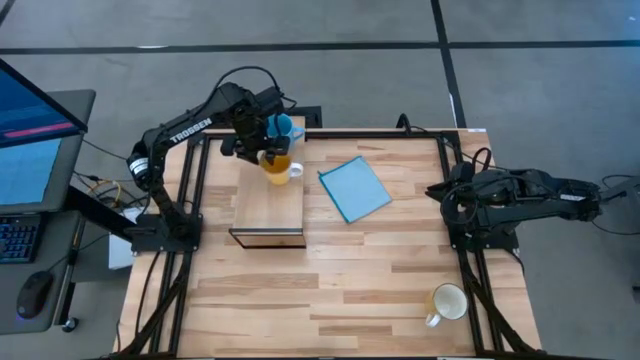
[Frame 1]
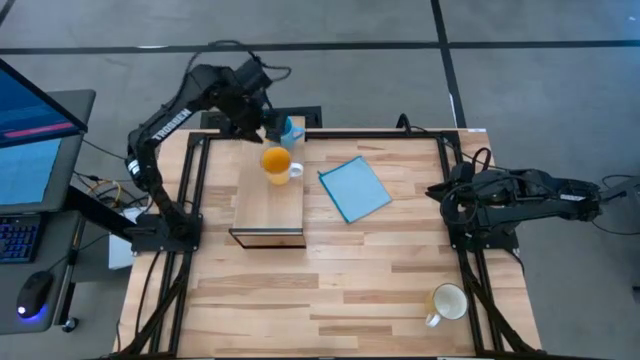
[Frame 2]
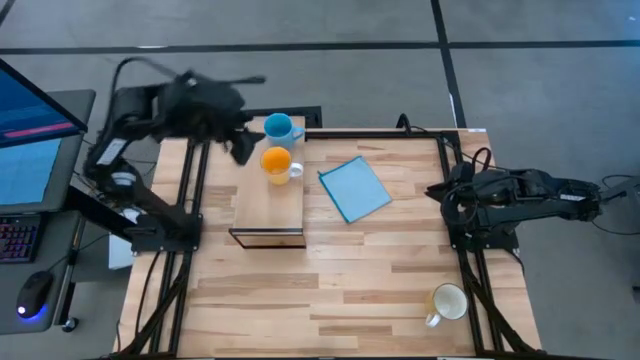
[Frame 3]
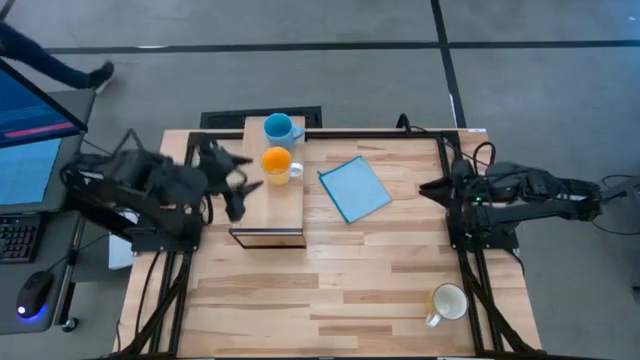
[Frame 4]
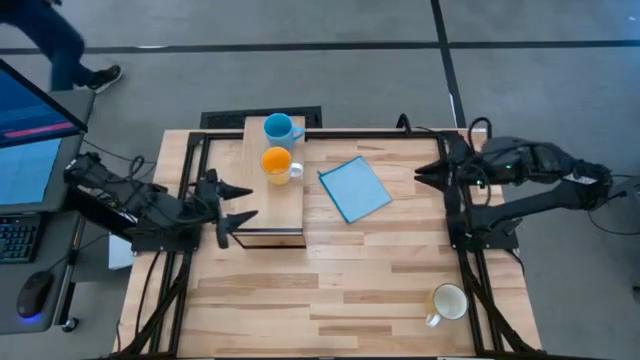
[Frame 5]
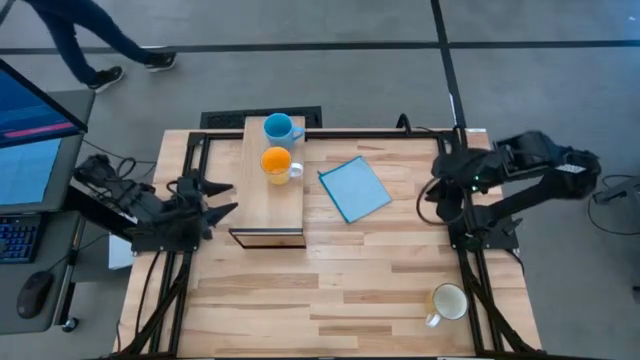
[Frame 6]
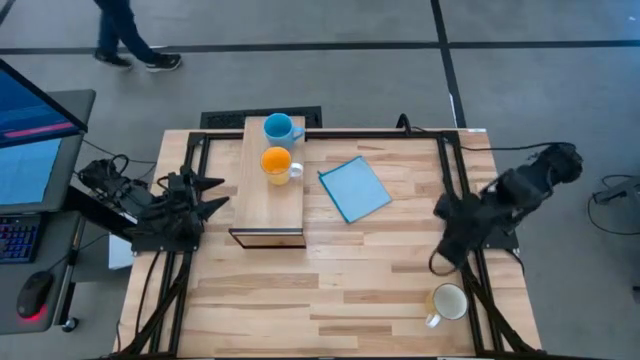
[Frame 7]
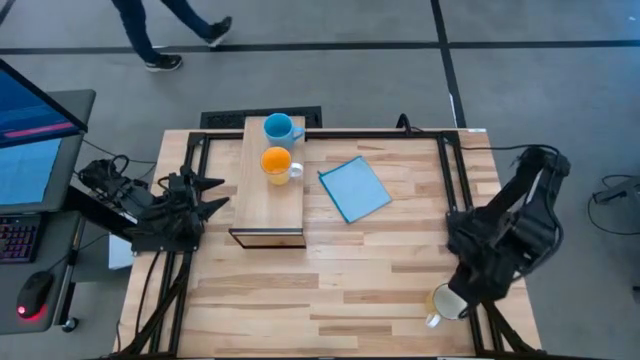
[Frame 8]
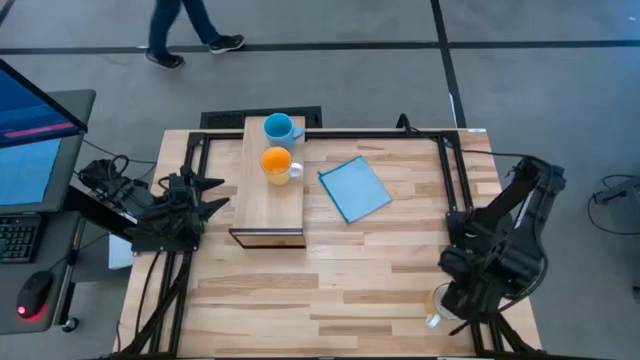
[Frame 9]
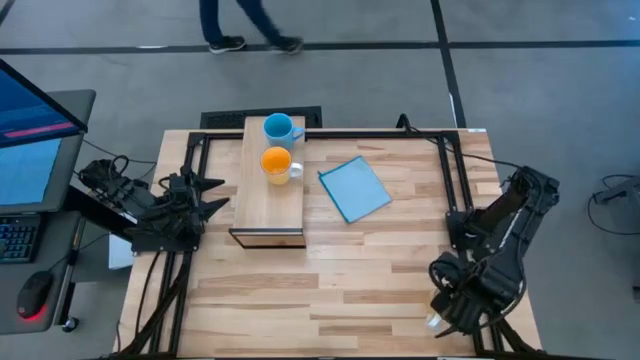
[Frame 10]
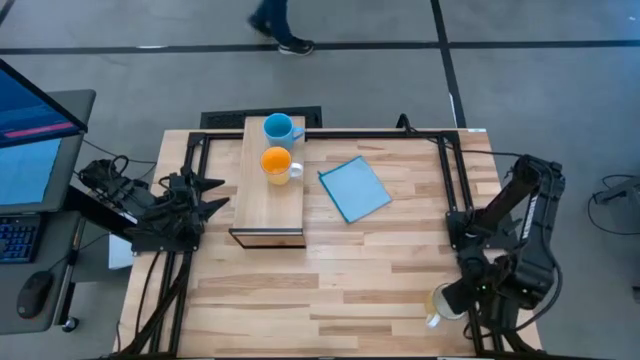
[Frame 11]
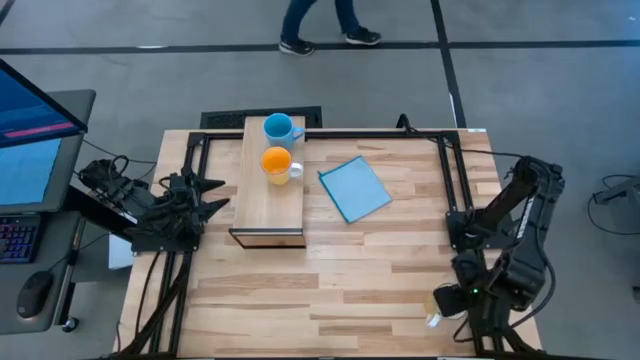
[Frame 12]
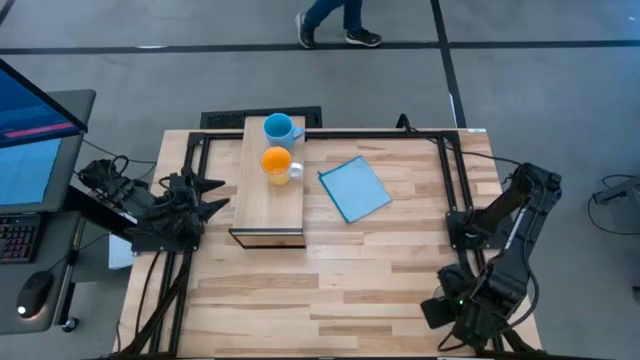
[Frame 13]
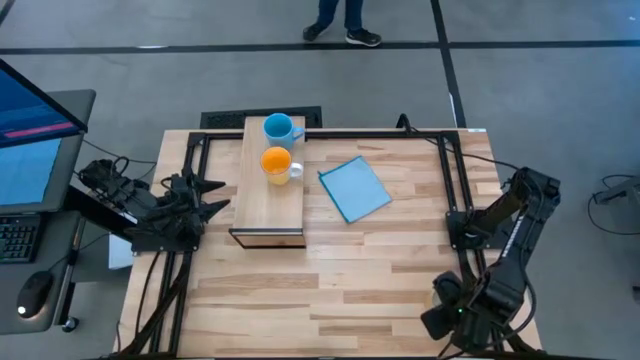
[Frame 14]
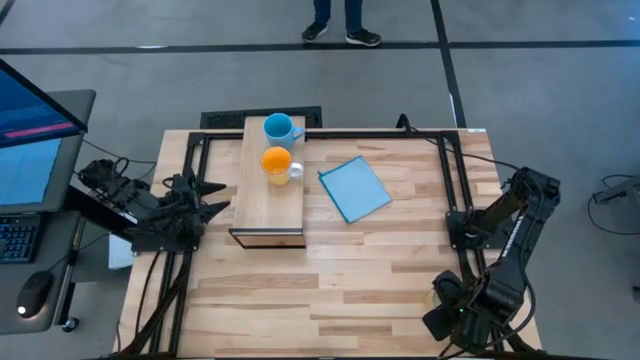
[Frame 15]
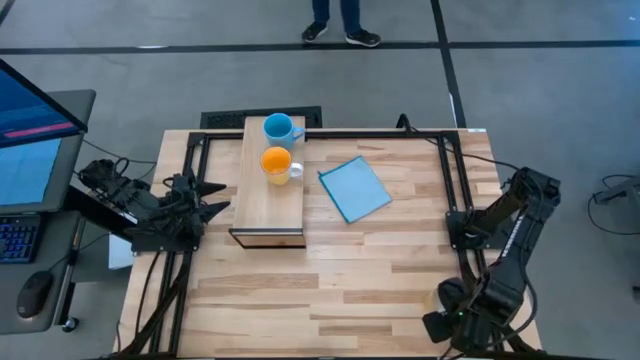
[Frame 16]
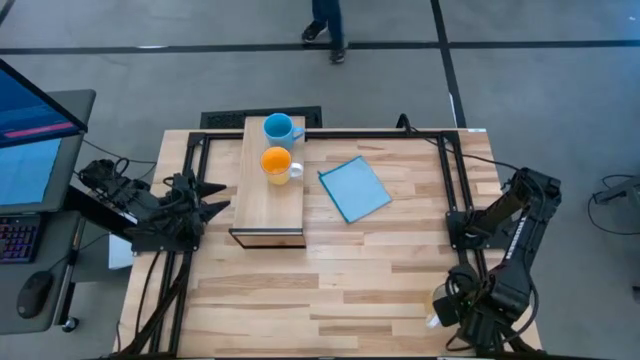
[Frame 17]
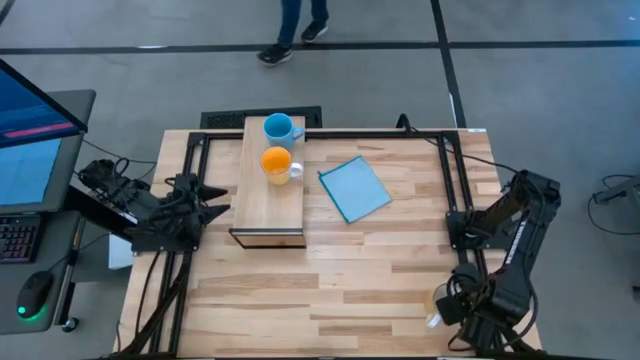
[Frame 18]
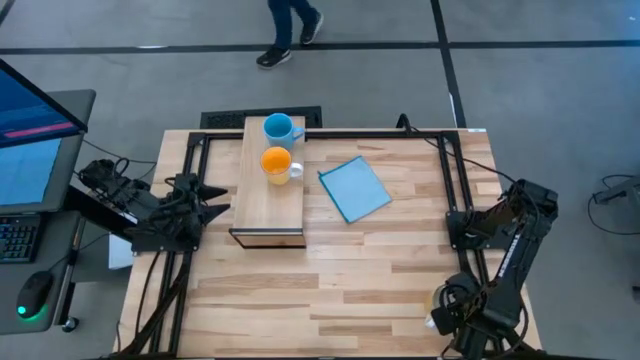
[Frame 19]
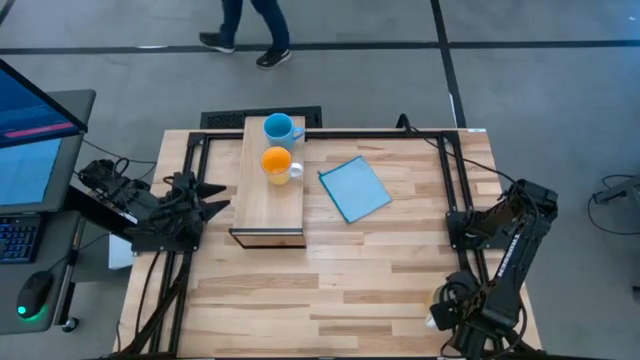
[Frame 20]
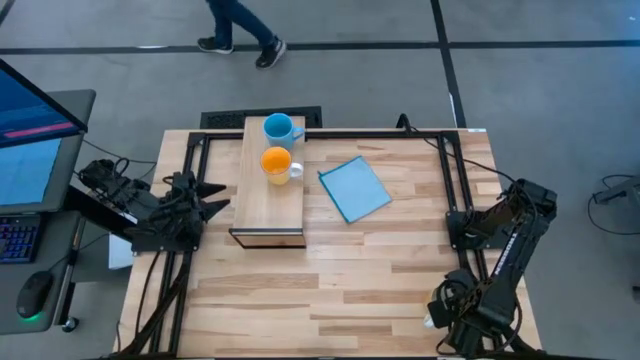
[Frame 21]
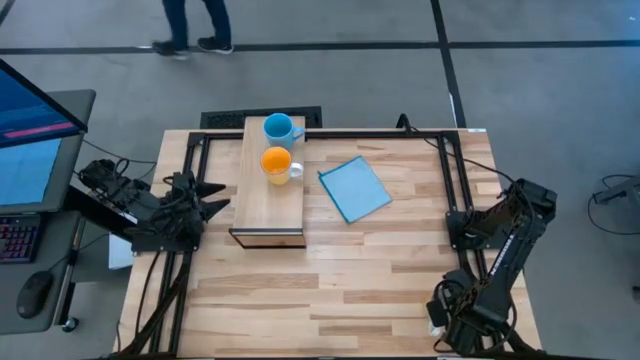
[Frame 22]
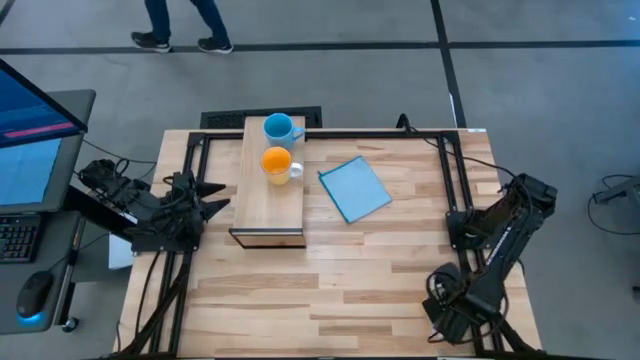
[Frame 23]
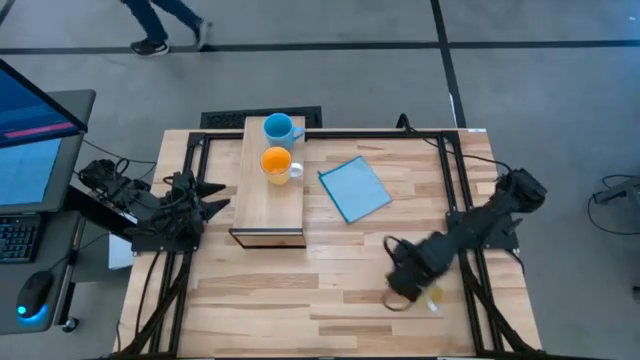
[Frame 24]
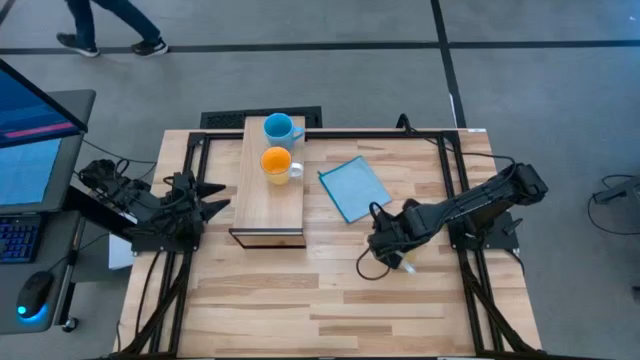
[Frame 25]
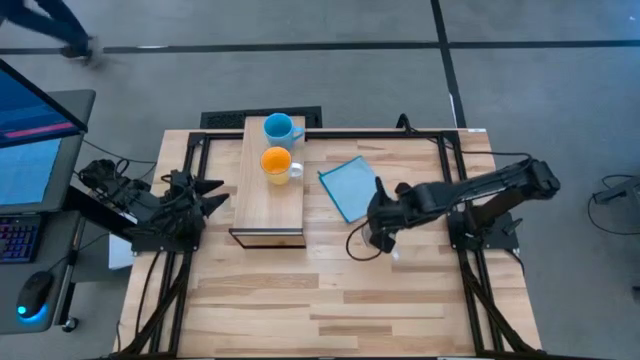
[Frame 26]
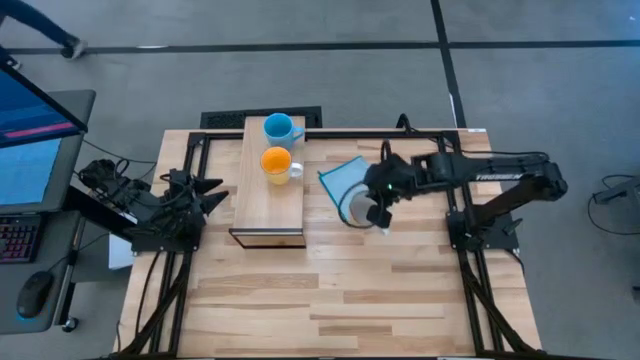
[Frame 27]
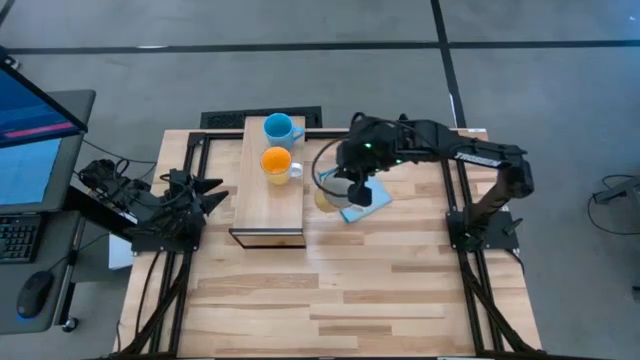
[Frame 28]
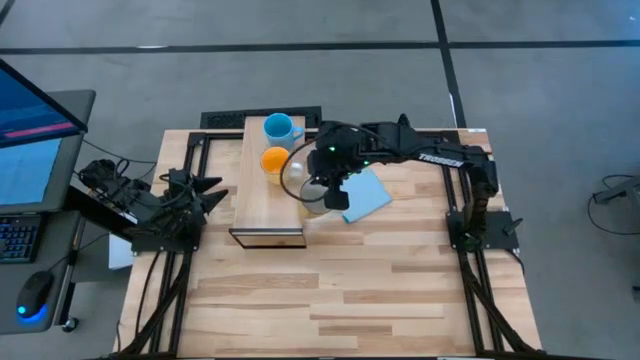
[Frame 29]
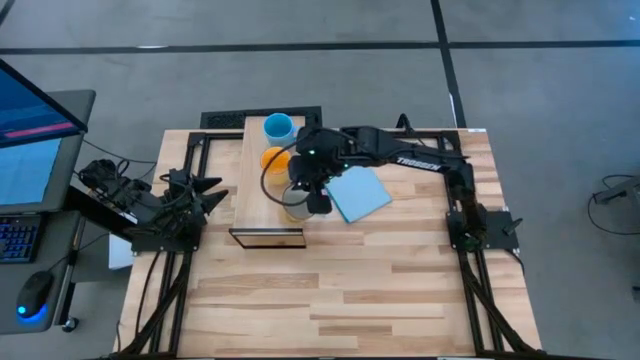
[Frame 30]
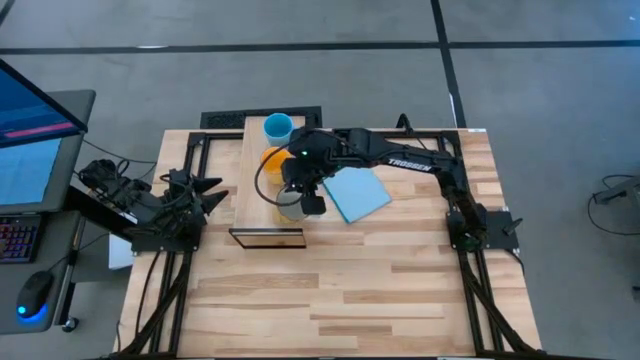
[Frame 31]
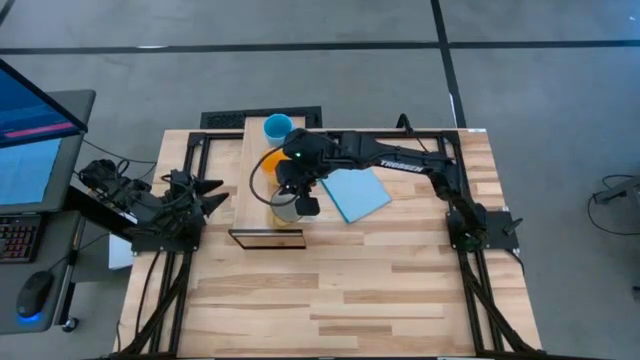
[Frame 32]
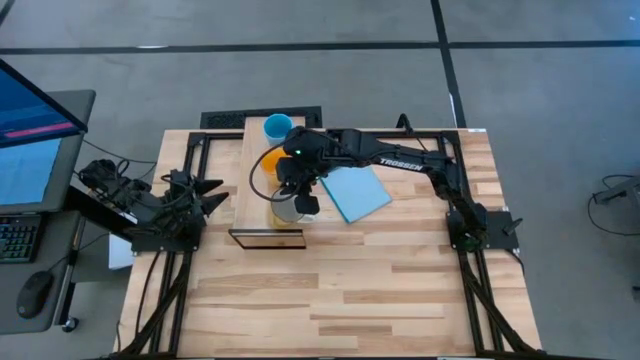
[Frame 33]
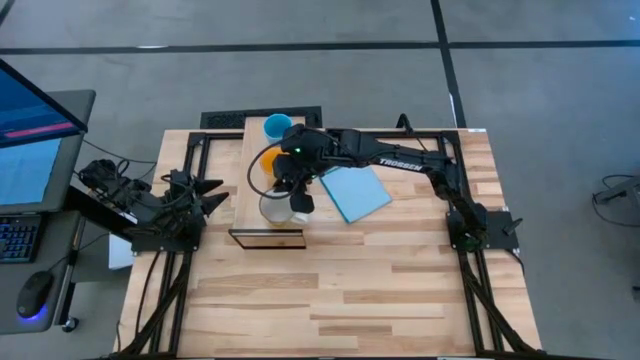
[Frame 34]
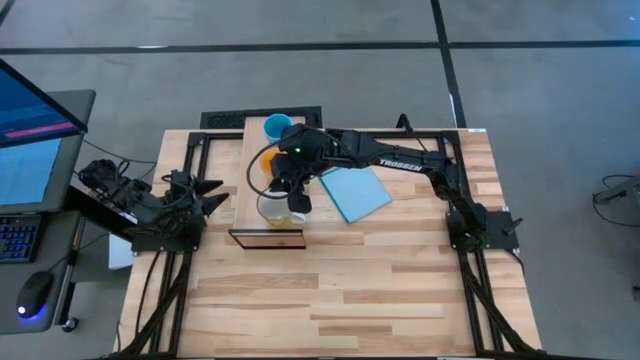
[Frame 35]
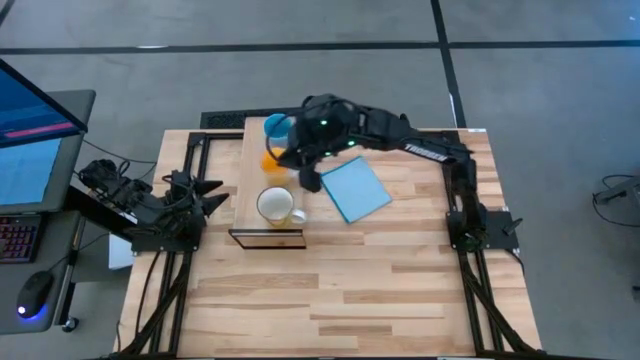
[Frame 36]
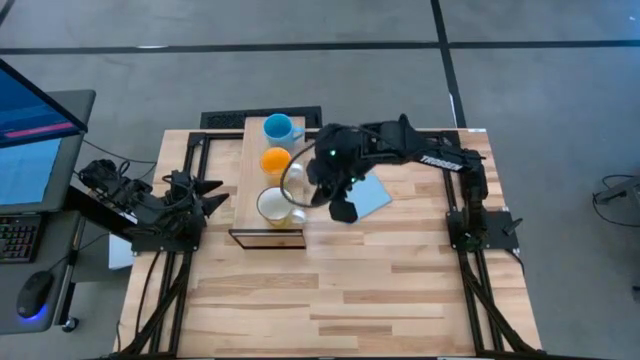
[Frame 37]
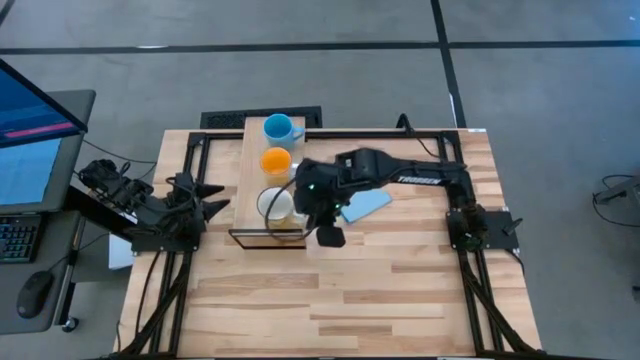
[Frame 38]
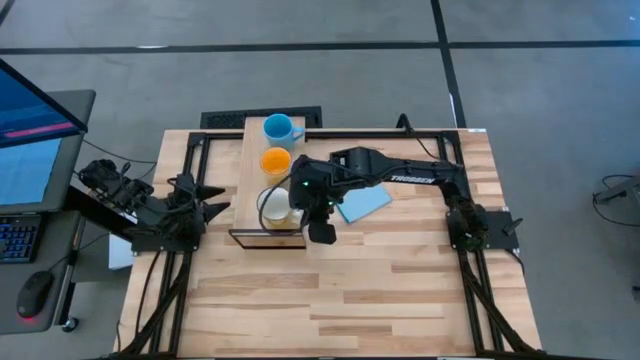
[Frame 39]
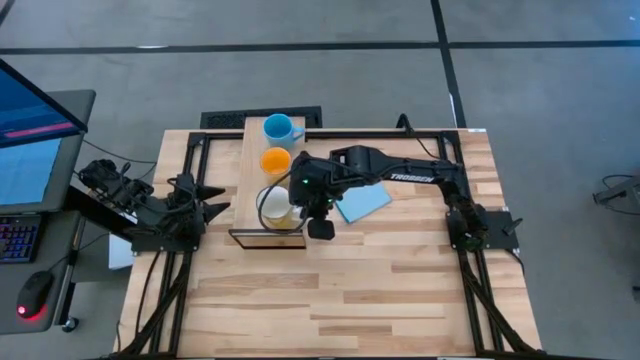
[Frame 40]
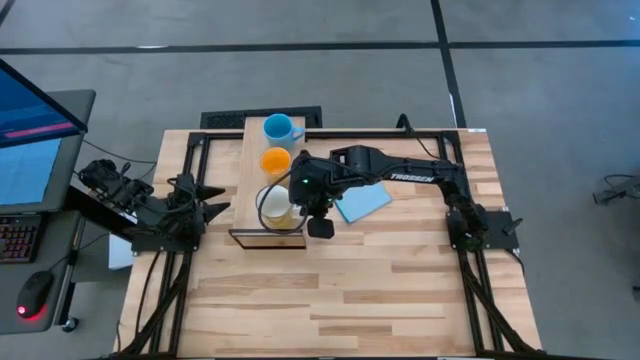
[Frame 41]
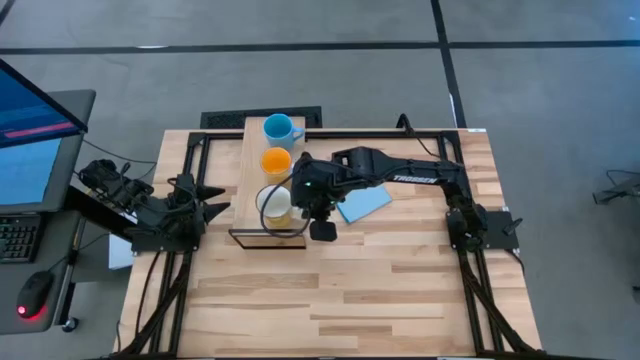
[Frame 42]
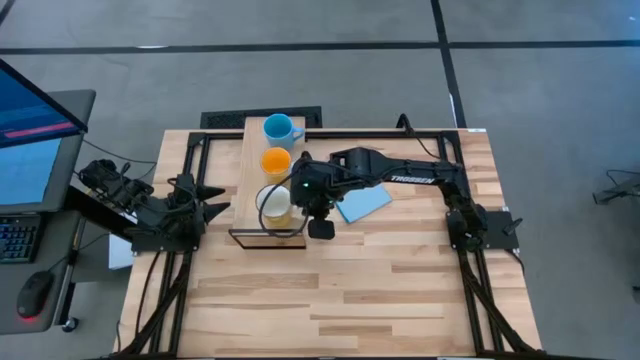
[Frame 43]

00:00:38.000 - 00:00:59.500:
Task: Stack small to large cups/mugs on shelf
Put the yellow and white mug on the shelf

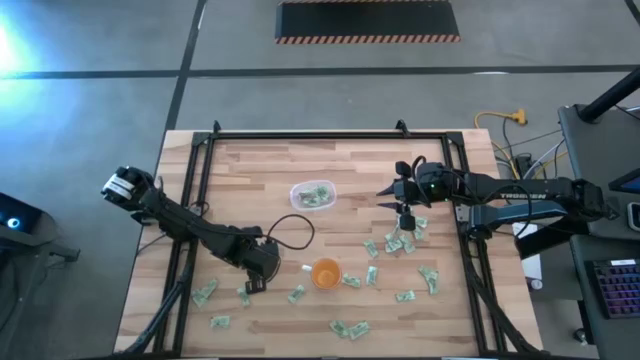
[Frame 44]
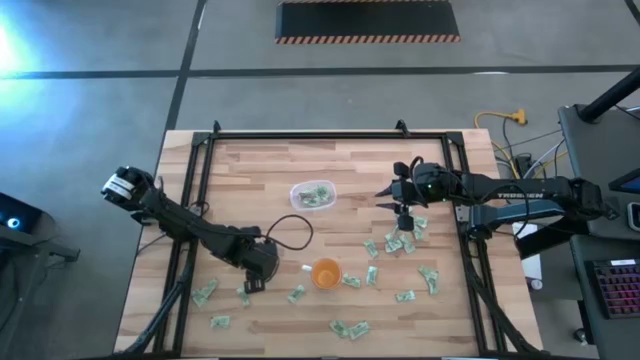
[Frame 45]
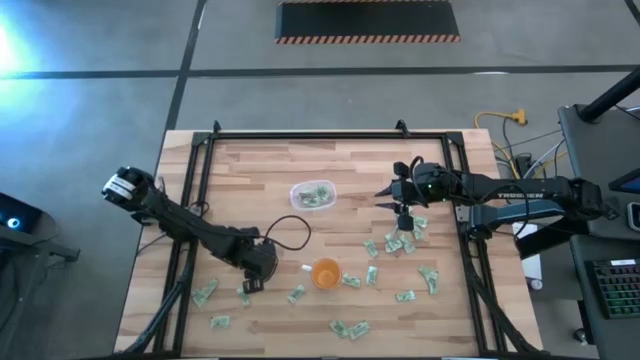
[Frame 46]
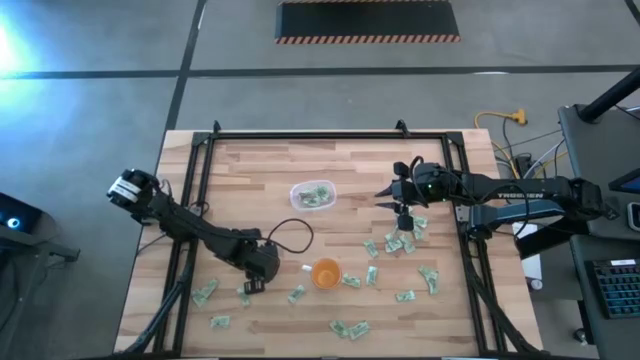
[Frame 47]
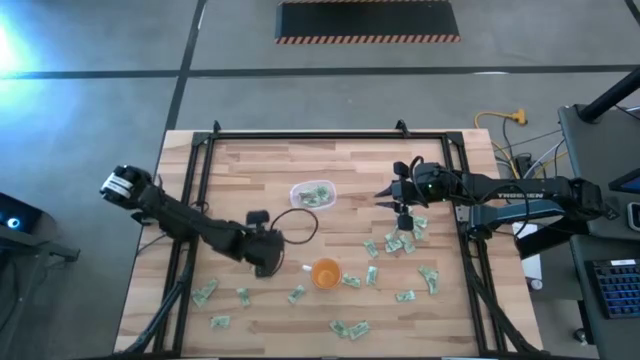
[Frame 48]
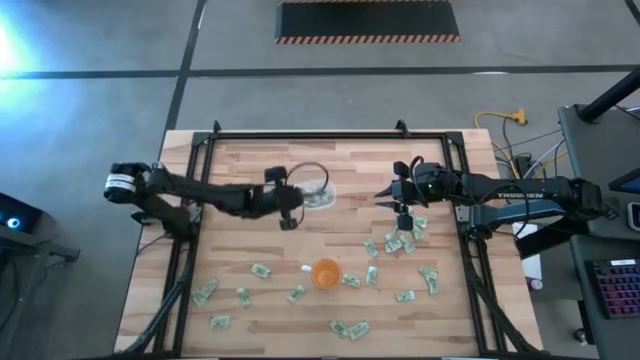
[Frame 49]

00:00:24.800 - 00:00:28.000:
Task: Pick and place Stevia / Truvia into bins
Put the stevia packet into the transparent bin
